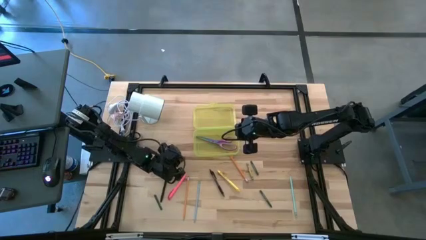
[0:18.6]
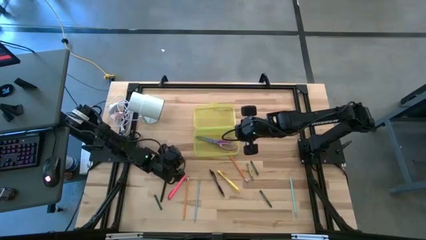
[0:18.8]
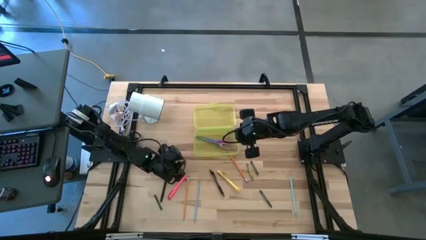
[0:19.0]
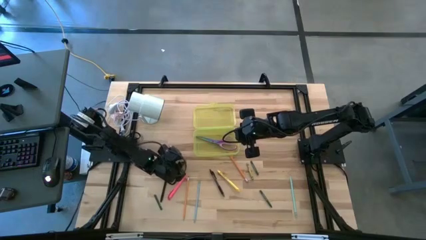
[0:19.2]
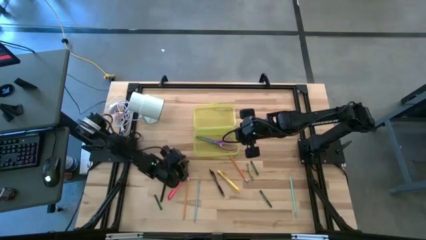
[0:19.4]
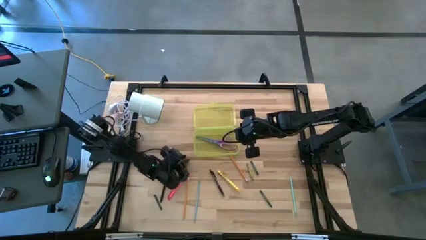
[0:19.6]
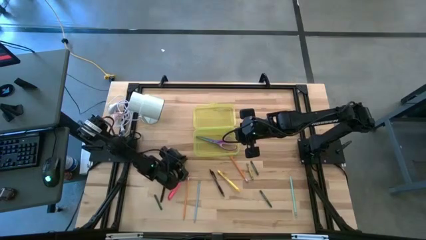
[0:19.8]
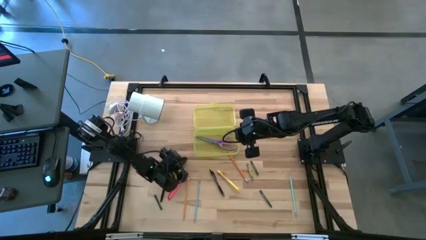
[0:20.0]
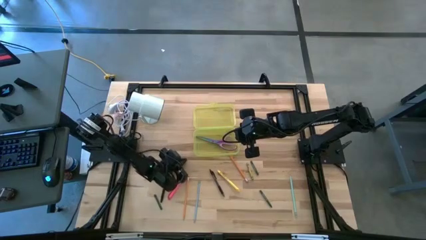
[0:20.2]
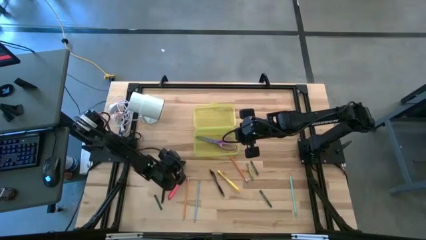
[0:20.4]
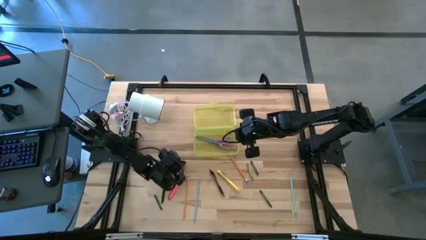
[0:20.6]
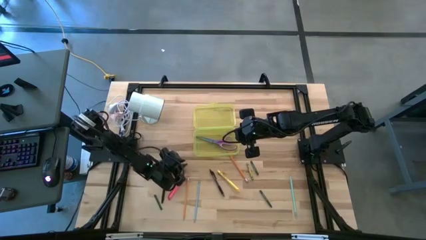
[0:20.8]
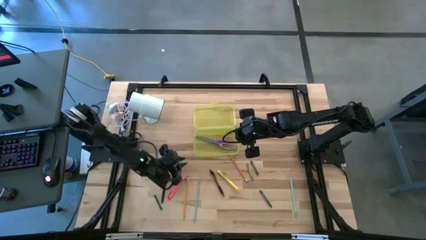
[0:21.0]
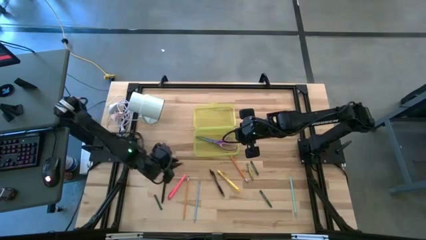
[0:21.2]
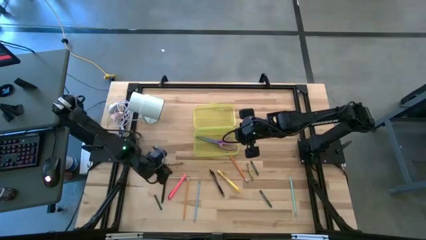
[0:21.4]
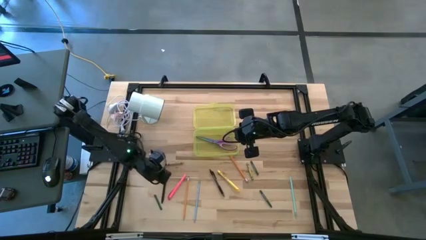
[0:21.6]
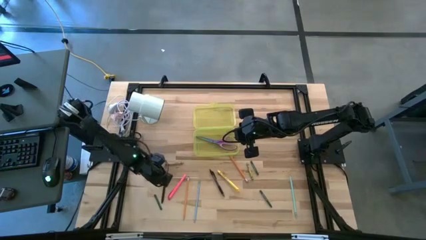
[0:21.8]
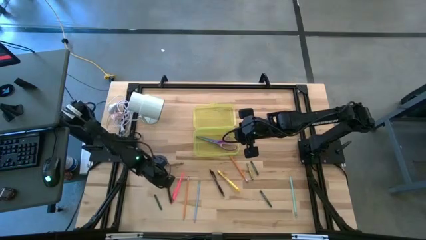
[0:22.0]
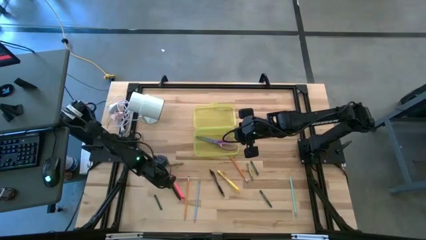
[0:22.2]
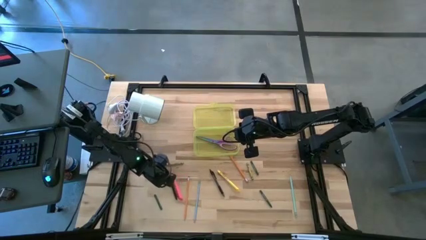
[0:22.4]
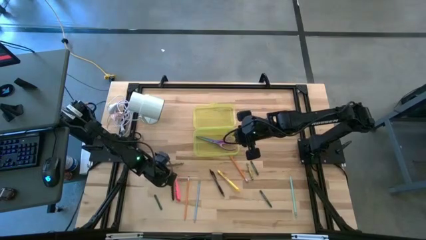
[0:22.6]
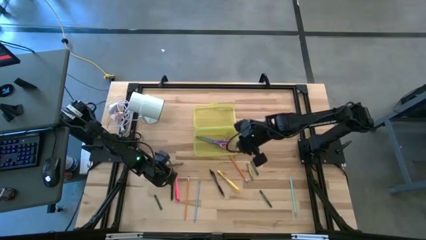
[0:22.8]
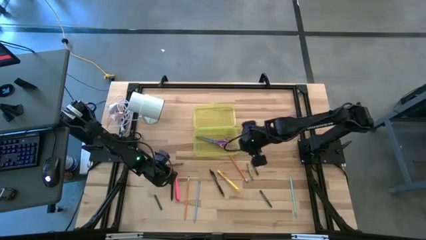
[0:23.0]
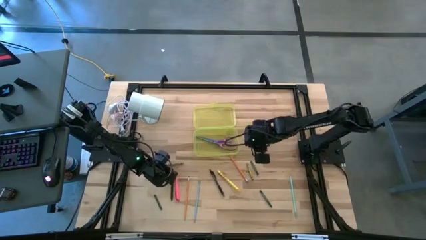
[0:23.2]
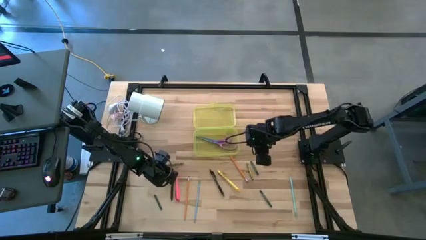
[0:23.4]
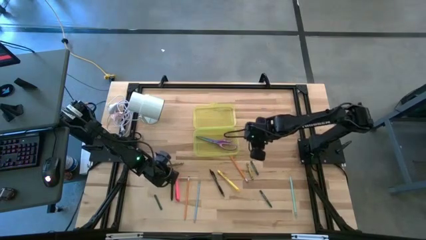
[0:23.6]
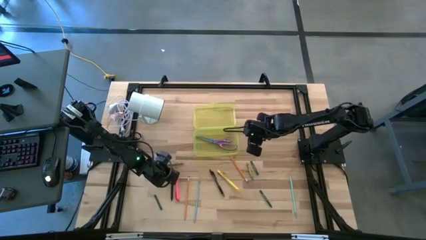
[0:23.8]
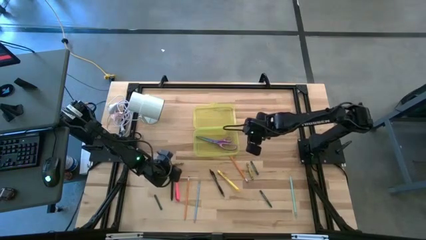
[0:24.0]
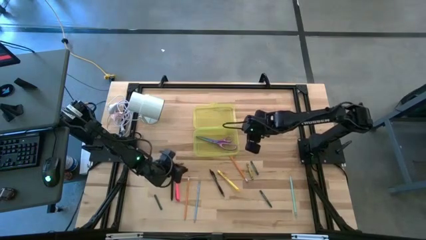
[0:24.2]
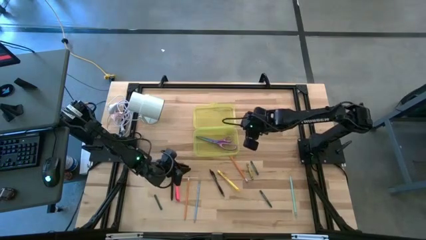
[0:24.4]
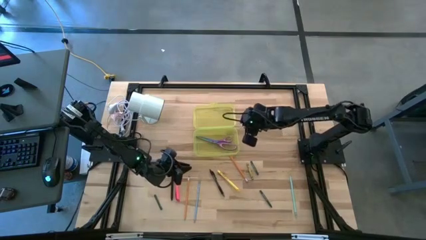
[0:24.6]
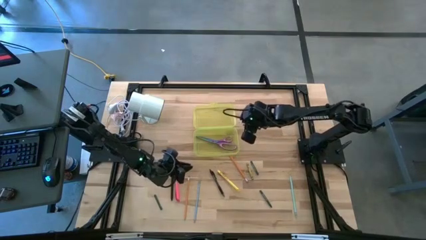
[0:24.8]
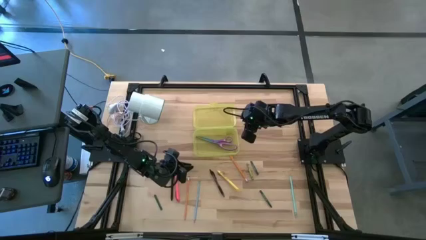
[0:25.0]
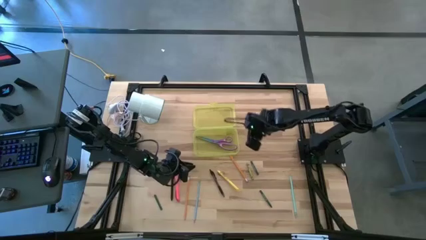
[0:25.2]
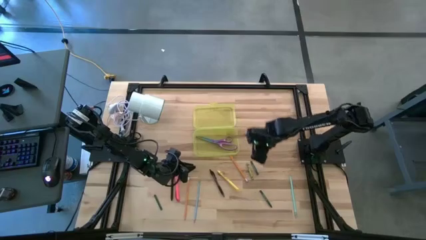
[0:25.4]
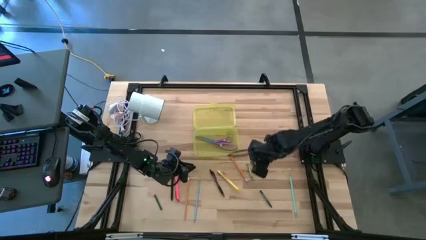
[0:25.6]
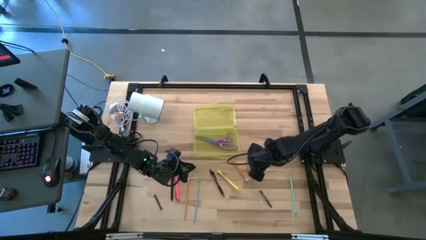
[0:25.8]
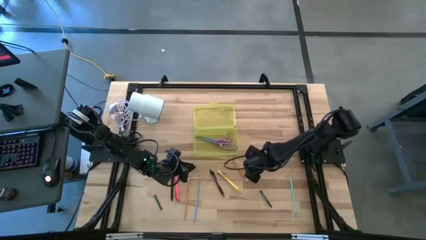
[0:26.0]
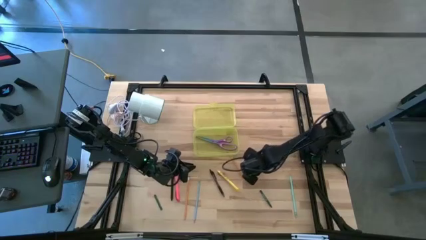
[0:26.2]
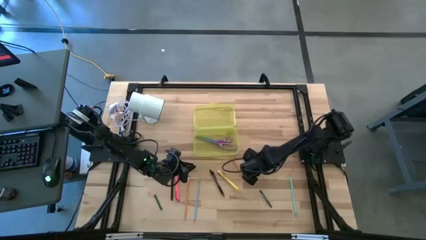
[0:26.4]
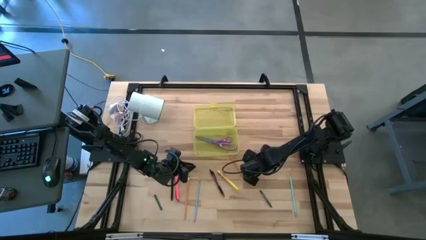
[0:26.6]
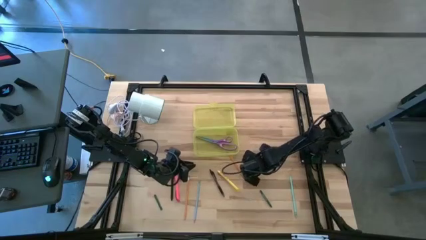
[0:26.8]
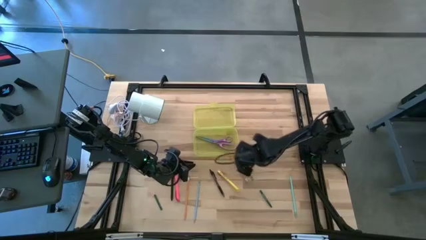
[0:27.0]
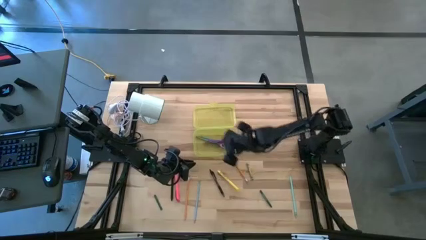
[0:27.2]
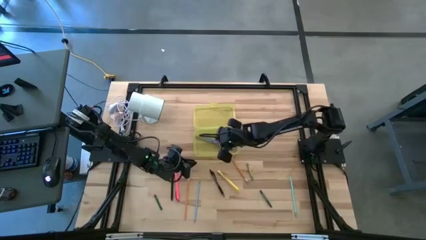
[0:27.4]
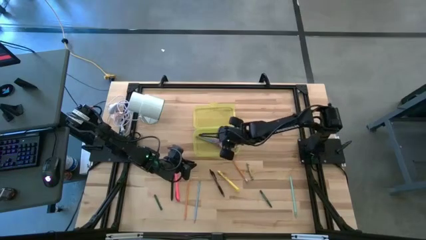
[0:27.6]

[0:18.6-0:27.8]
Task: Pick & place school supplies into a supply box
Put the dark green crayon into the supply box

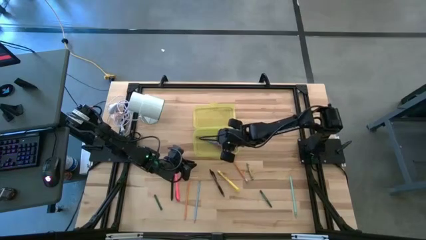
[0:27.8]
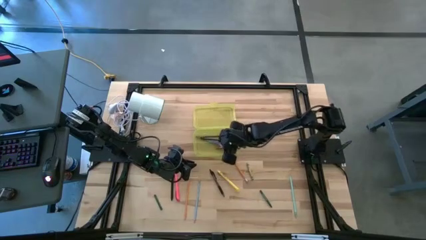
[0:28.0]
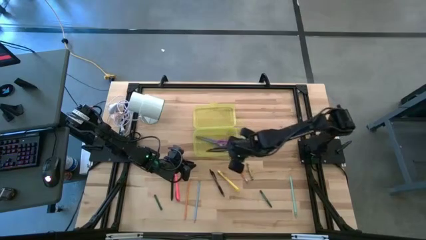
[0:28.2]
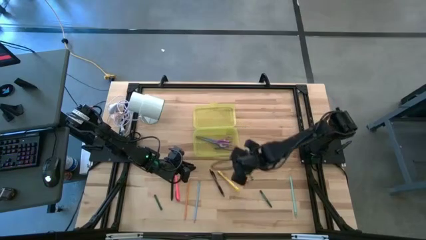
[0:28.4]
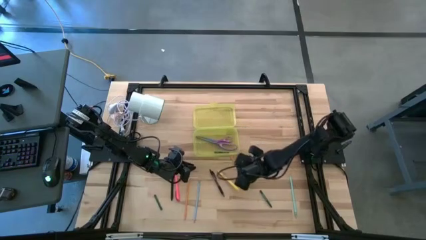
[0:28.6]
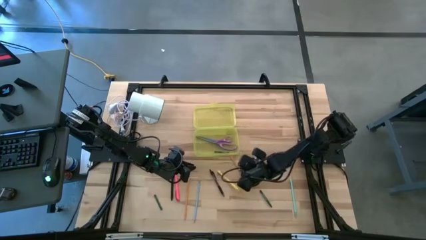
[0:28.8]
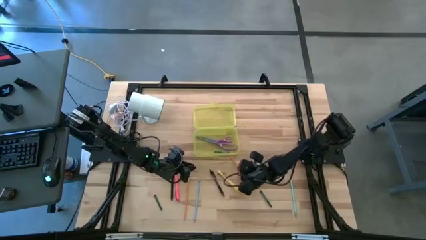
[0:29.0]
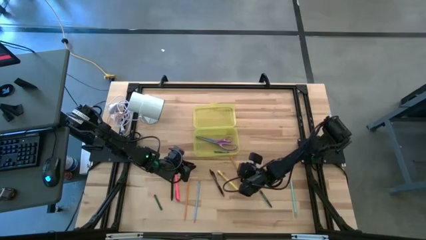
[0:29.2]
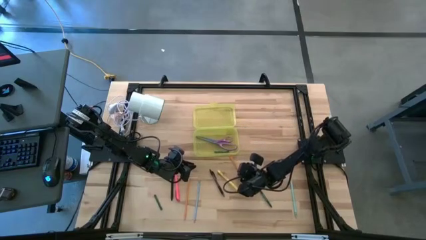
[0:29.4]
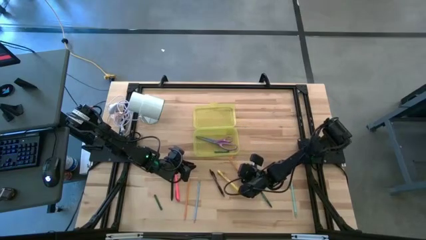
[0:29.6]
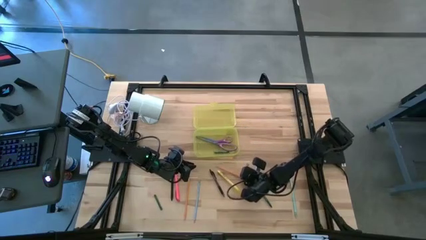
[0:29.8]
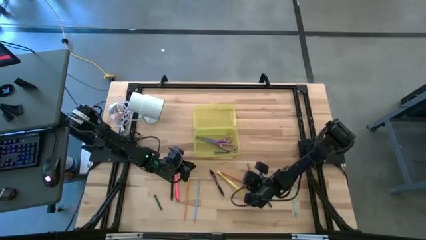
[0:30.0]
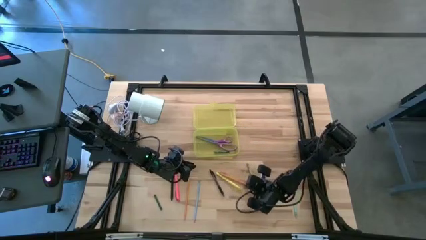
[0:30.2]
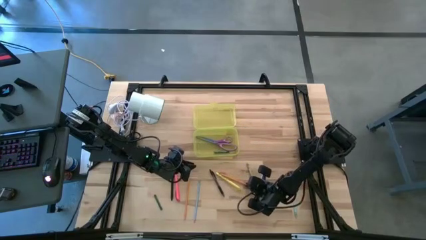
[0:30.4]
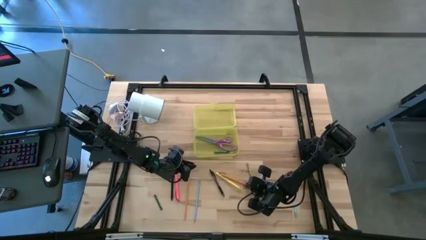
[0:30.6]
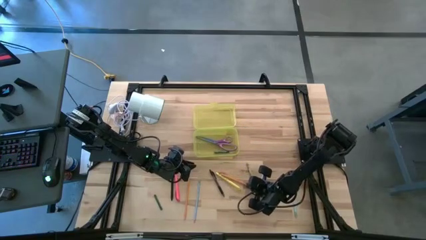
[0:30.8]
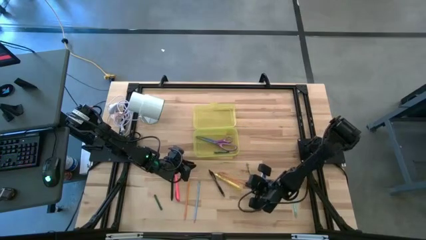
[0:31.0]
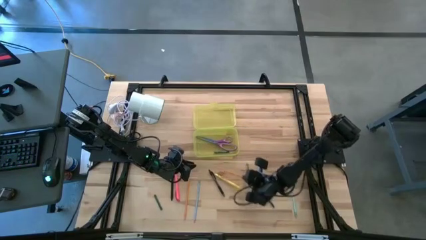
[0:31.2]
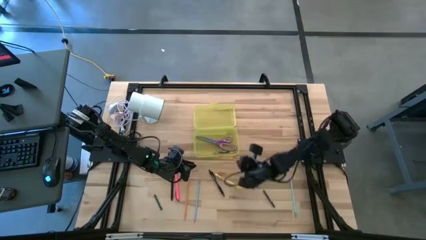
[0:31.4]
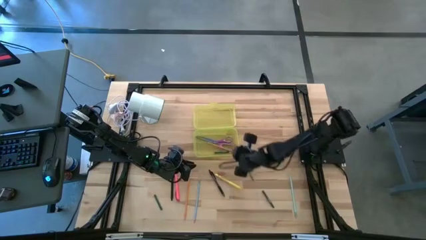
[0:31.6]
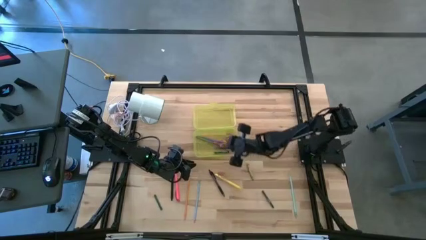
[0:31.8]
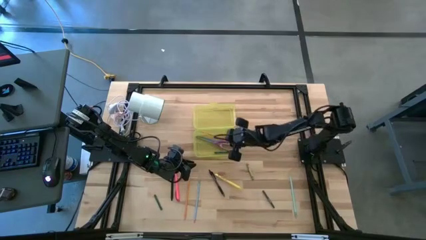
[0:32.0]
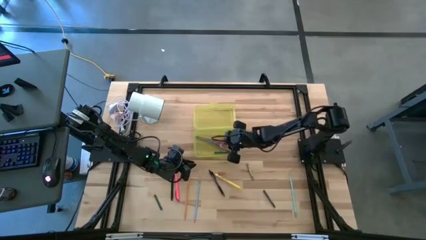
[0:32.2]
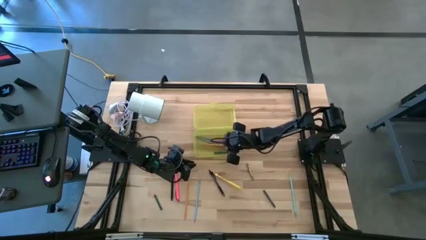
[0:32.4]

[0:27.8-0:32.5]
Put the orange pencil into the supply box

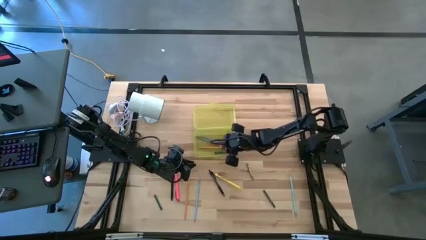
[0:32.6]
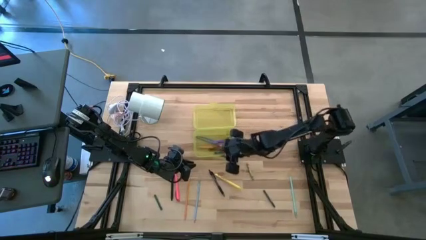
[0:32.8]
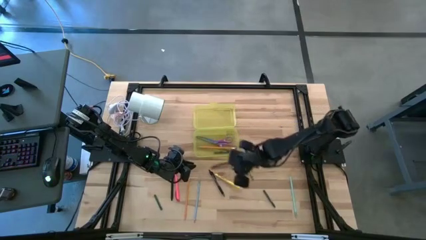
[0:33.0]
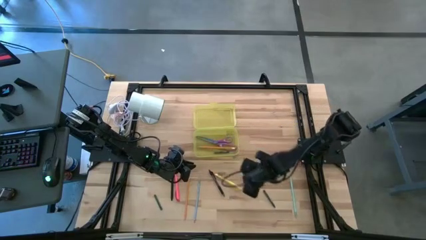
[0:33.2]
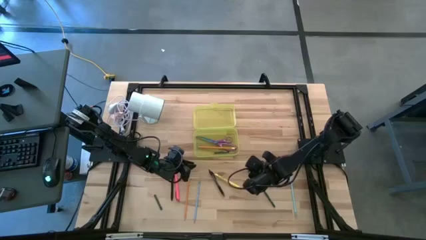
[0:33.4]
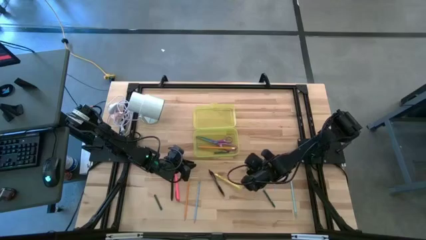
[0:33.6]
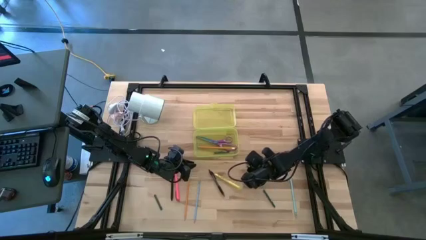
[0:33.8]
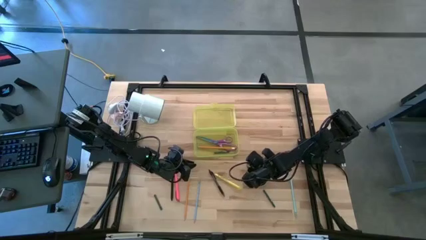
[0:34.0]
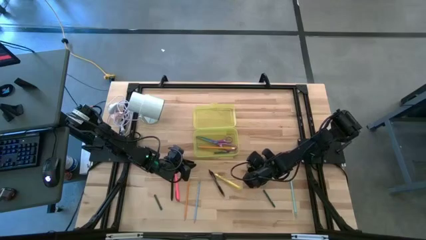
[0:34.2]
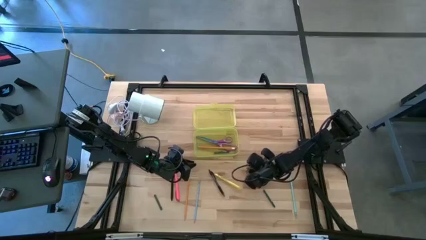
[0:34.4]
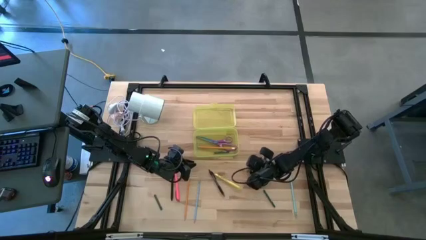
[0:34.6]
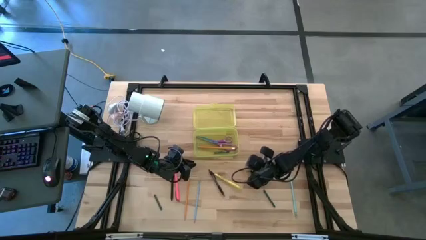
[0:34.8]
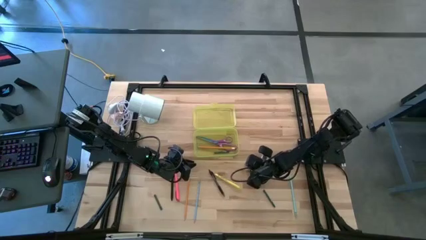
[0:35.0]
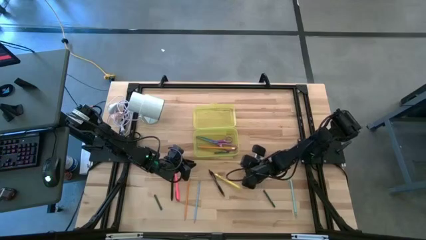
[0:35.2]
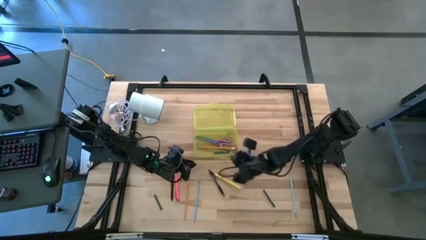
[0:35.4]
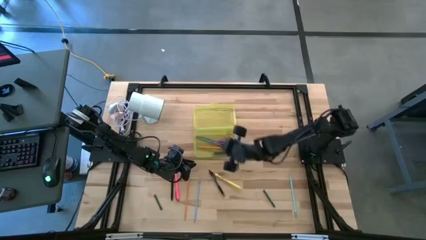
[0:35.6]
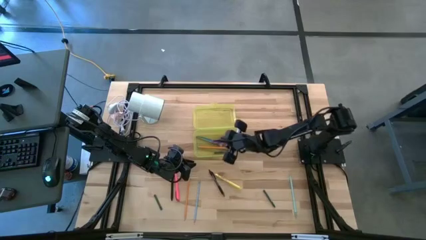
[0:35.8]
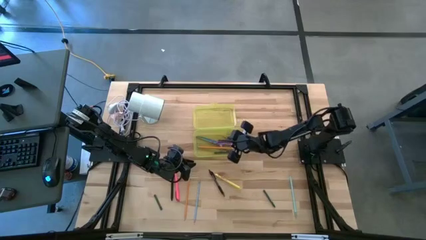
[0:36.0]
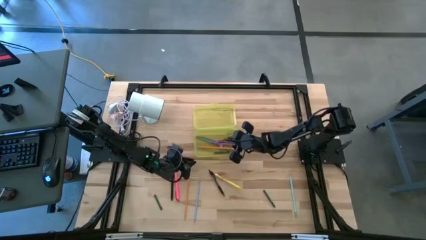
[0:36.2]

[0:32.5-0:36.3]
Put the green crayon into the supply box
